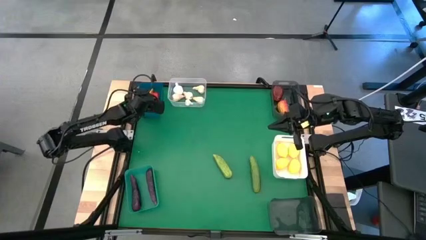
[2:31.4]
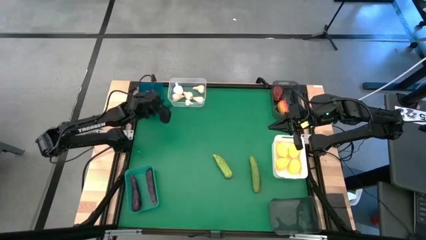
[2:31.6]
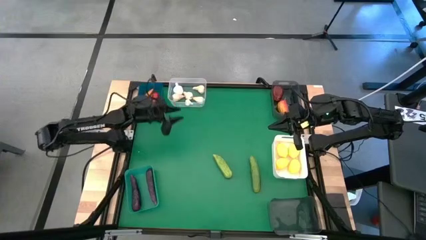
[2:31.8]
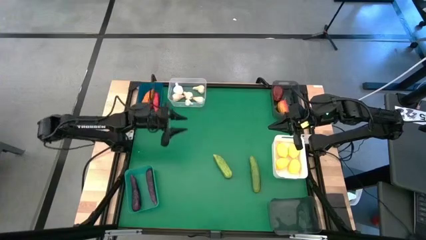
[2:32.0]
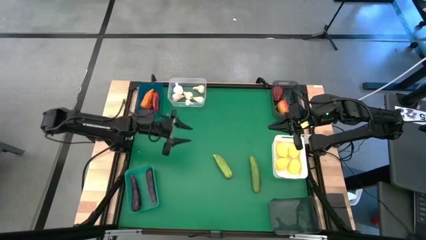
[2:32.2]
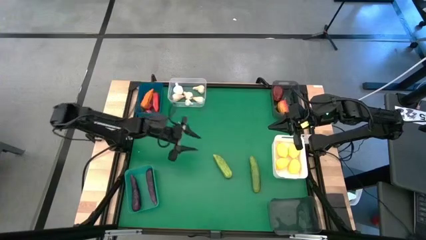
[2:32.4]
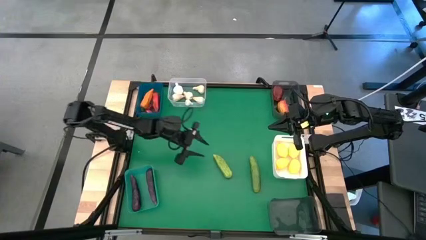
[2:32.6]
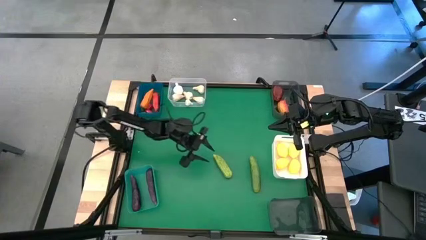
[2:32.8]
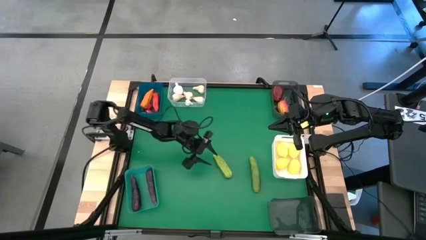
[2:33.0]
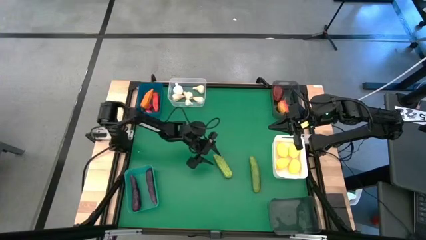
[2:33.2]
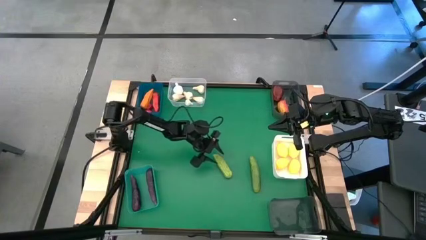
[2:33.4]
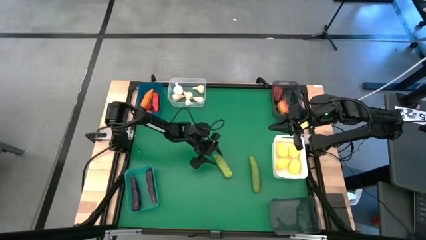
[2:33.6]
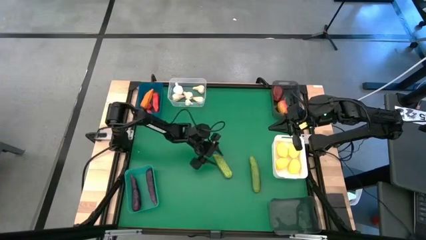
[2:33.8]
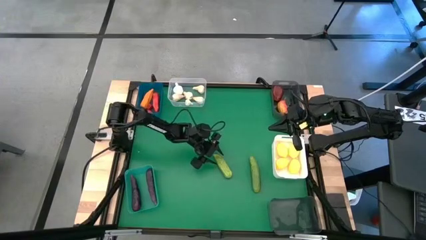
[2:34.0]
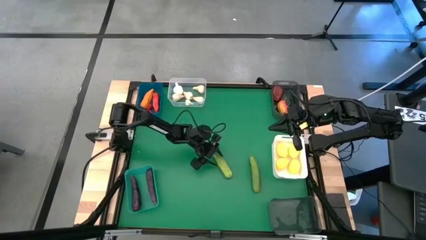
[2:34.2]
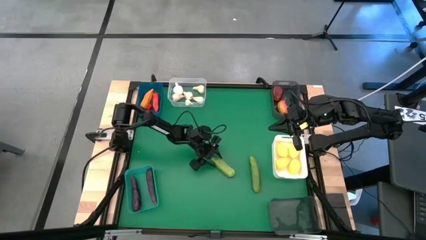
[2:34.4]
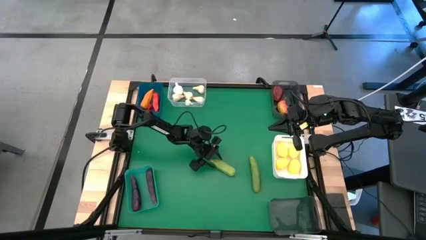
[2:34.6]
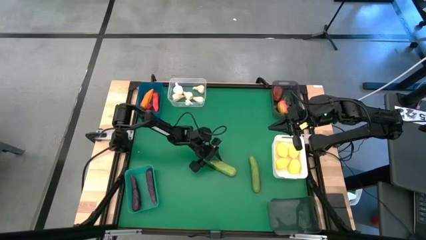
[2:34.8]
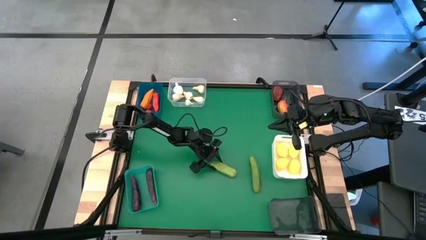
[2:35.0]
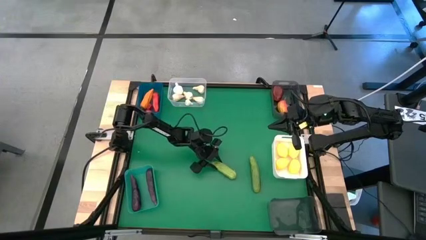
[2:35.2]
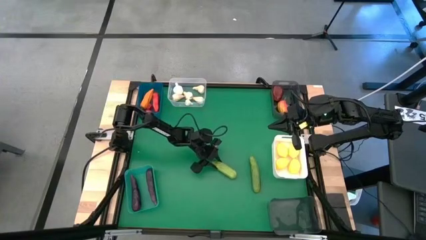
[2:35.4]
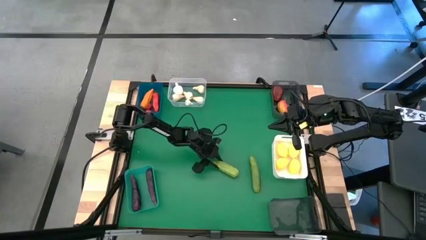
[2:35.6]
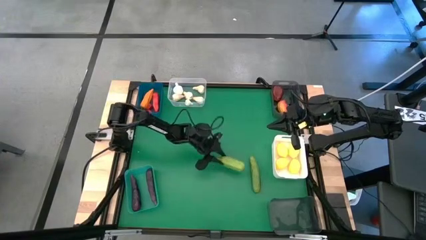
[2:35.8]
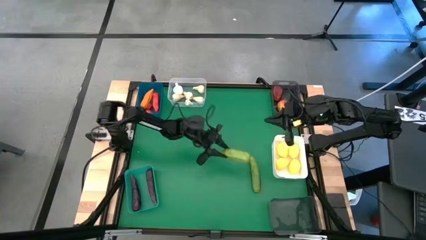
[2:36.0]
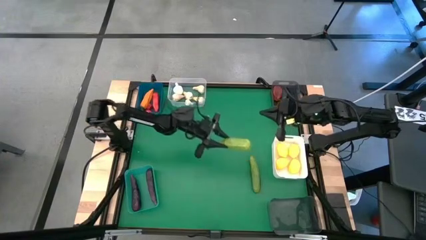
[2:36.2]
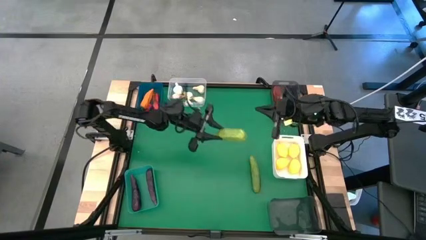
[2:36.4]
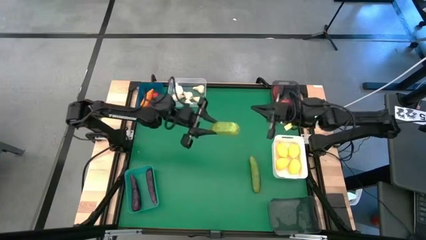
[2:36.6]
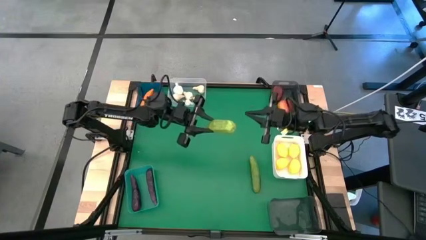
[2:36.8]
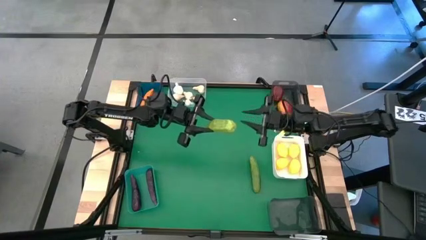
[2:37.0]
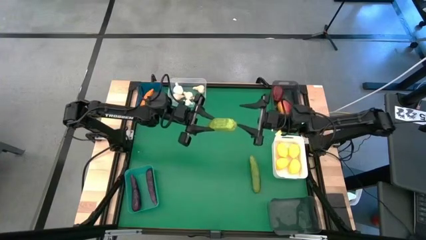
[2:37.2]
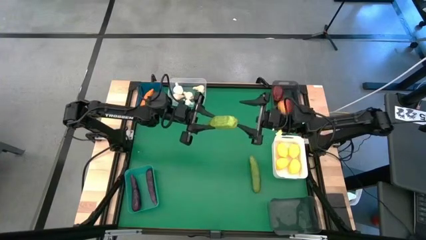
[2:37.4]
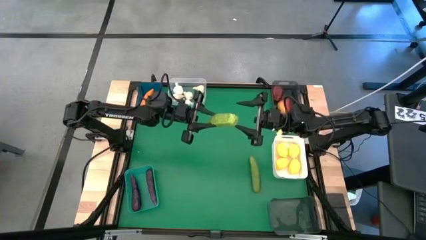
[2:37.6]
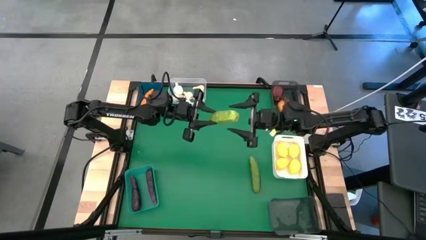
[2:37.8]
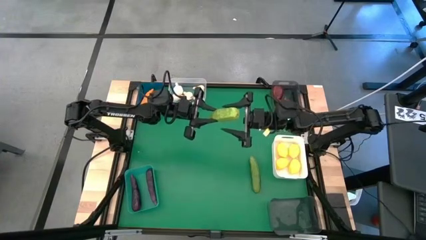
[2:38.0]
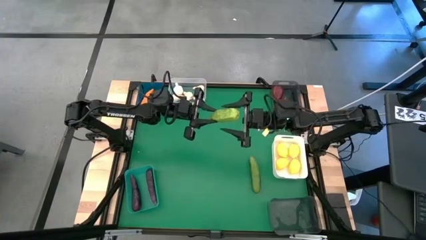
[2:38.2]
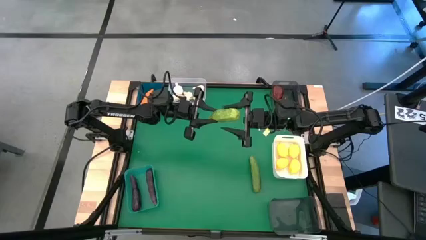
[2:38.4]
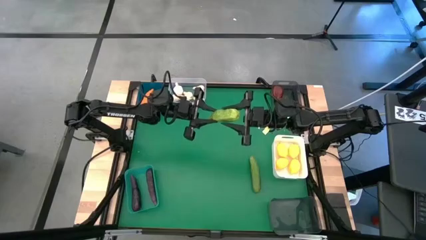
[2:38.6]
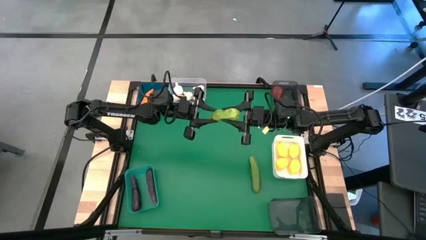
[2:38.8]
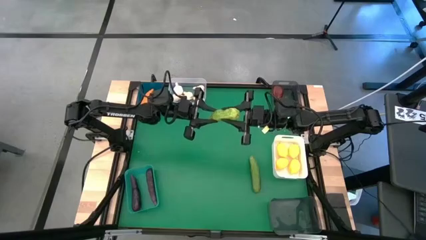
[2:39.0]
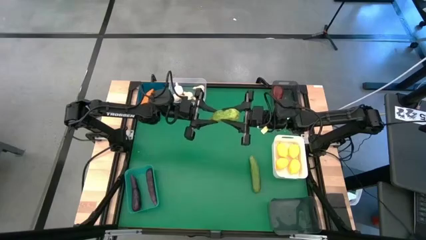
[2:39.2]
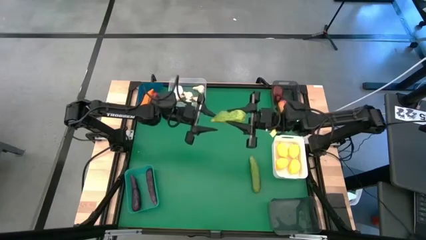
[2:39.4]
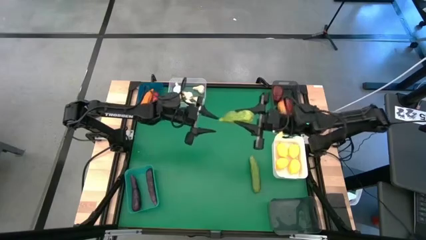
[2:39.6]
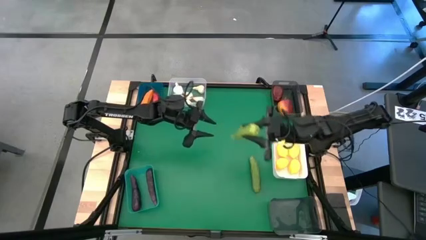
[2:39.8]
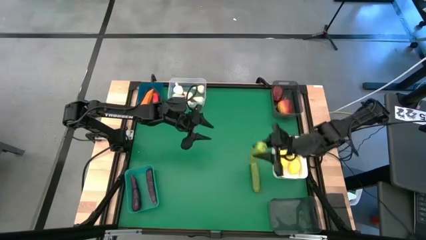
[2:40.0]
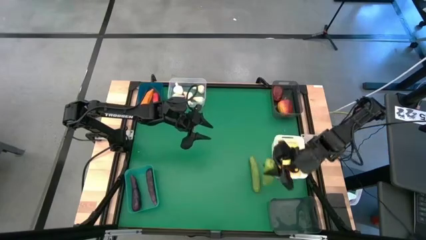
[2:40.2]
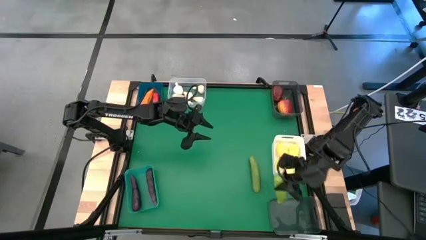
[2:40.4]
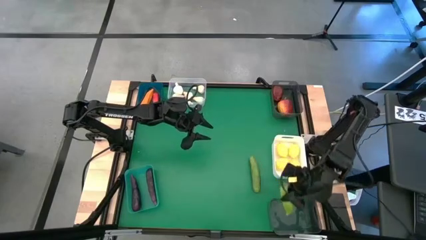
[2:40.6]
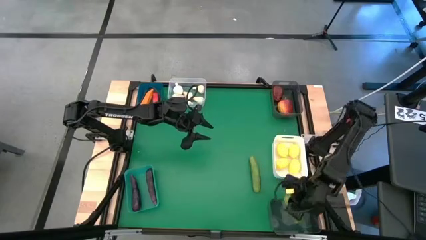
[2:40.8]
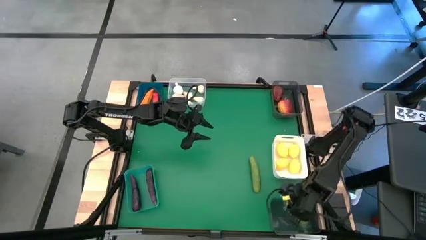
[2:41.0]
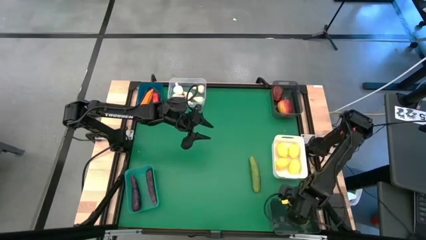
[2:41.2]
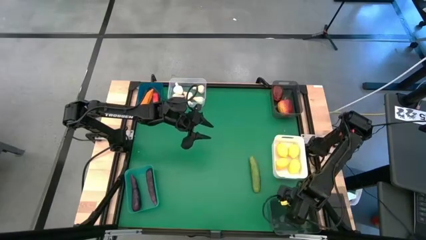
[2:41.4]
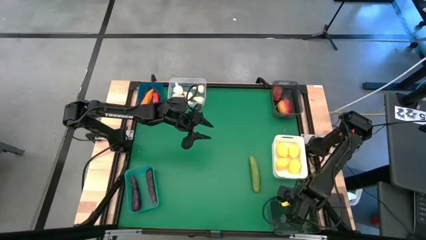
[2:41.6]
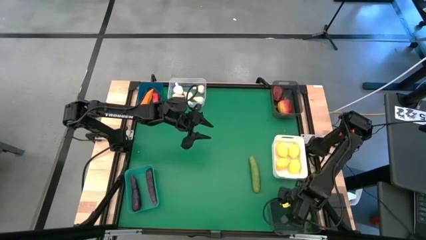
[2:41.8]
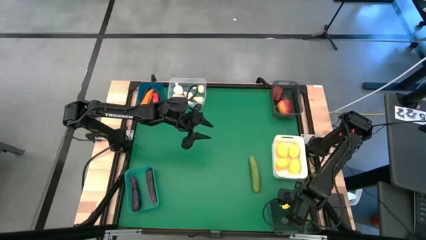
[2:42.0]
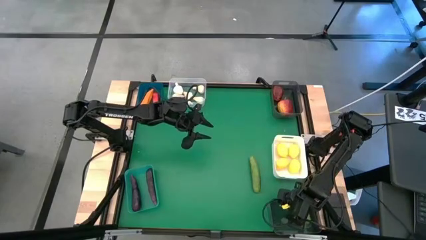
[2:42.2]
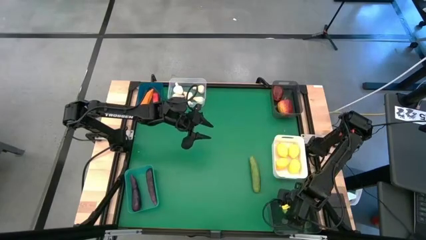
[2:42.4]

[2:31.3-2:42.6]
Task: Sort produce into baskets
Put the green cucumber into the bottom black bin

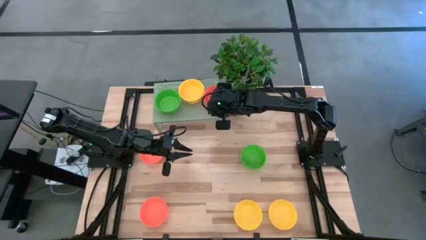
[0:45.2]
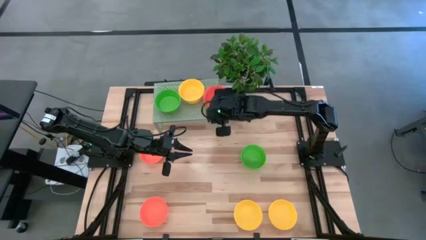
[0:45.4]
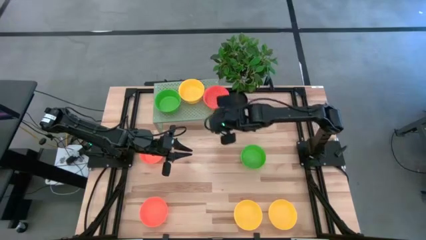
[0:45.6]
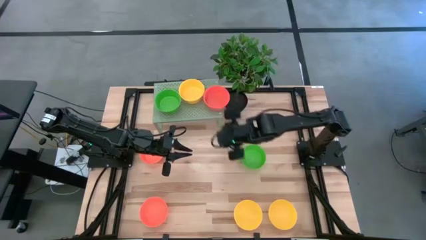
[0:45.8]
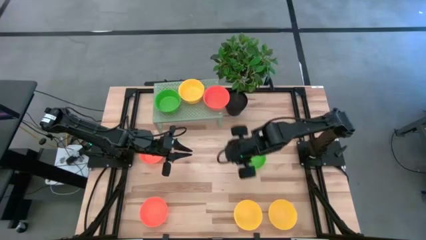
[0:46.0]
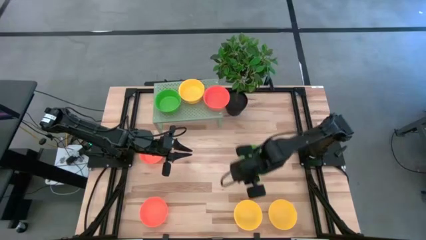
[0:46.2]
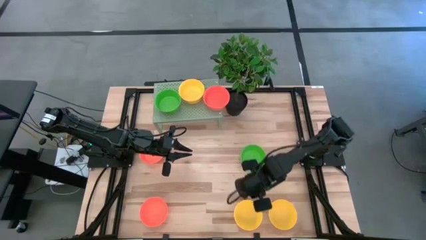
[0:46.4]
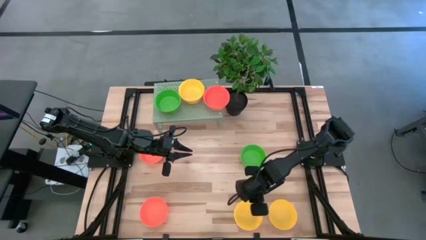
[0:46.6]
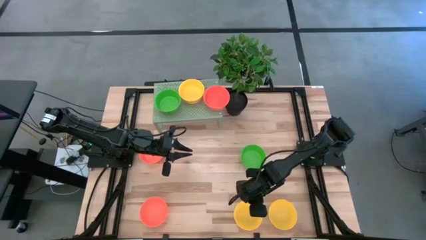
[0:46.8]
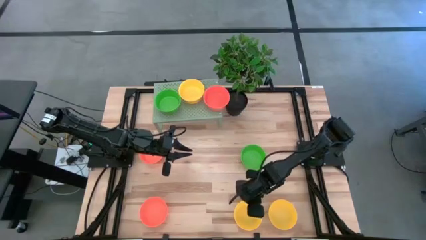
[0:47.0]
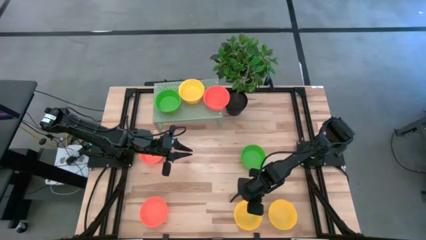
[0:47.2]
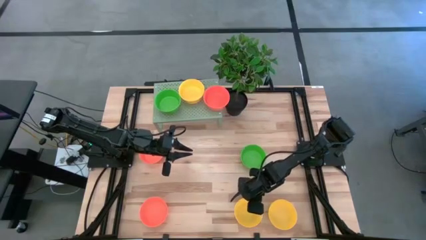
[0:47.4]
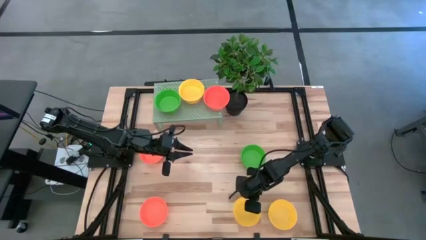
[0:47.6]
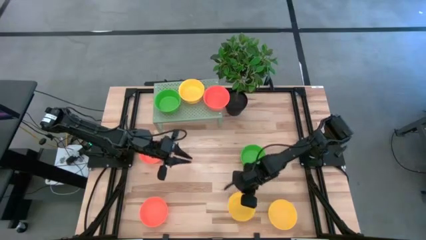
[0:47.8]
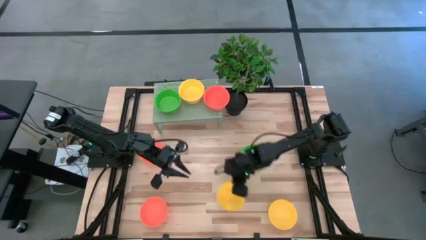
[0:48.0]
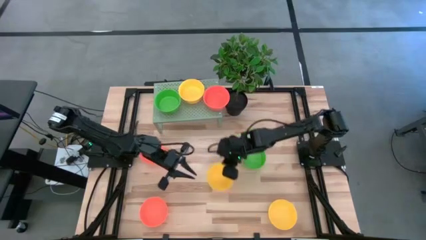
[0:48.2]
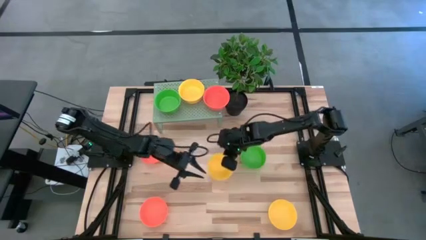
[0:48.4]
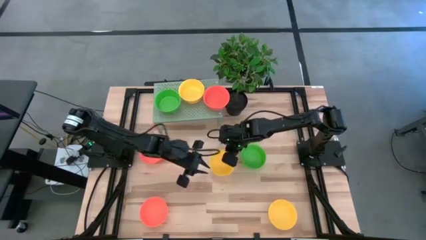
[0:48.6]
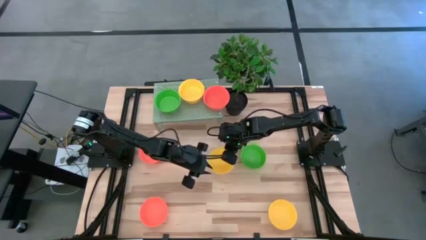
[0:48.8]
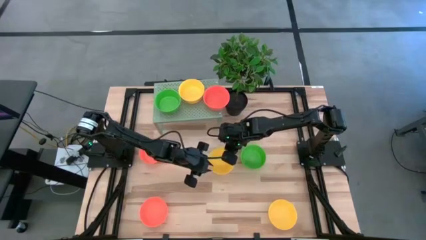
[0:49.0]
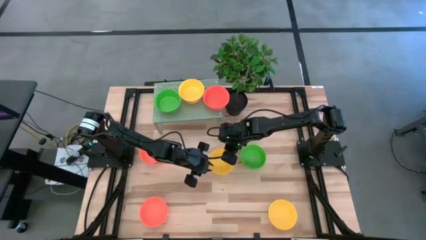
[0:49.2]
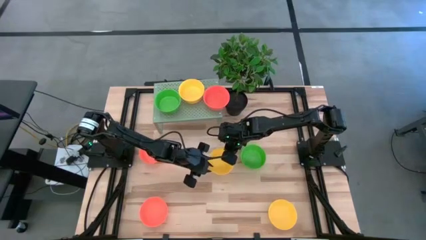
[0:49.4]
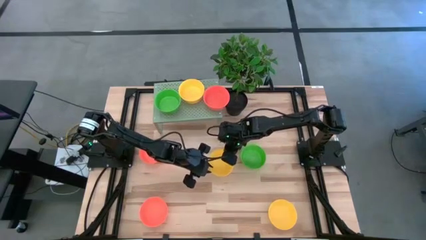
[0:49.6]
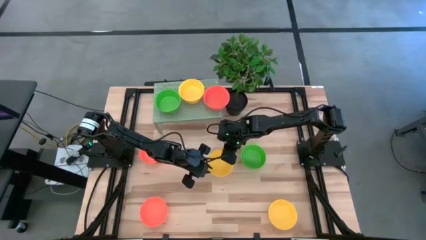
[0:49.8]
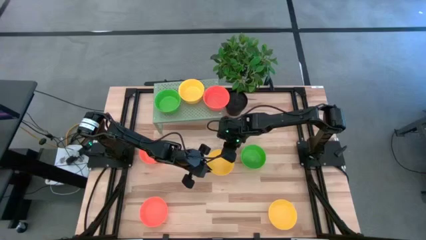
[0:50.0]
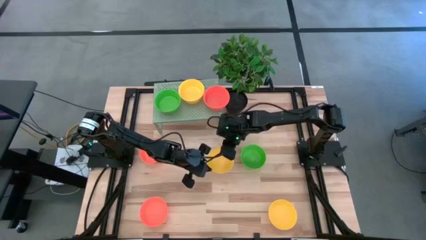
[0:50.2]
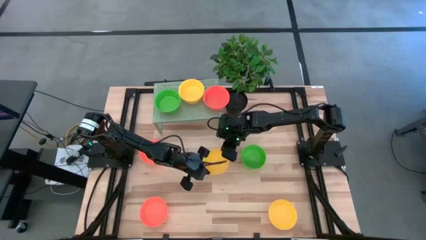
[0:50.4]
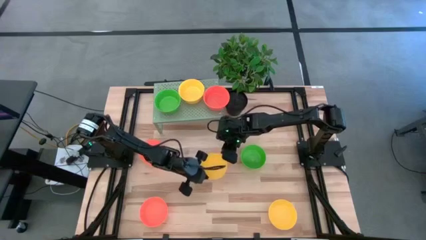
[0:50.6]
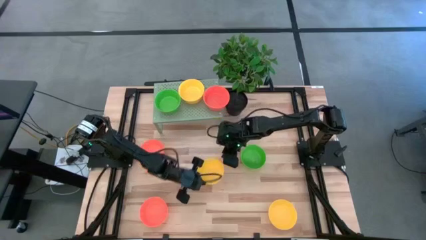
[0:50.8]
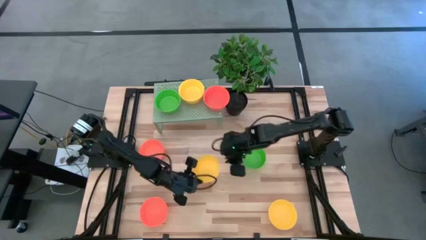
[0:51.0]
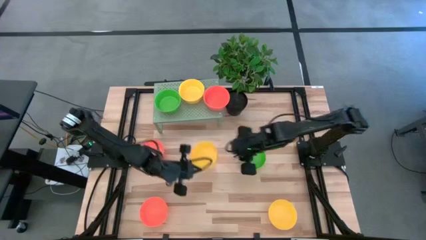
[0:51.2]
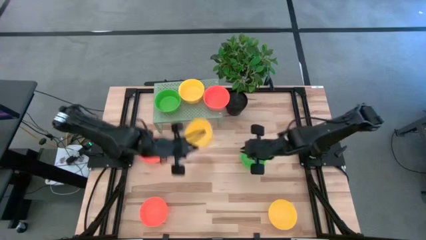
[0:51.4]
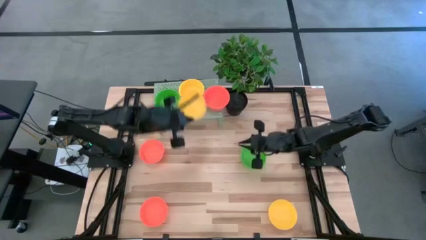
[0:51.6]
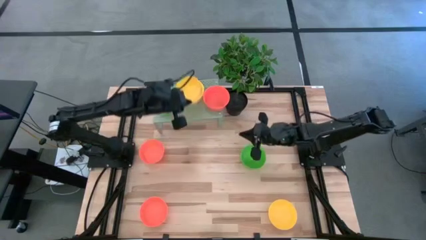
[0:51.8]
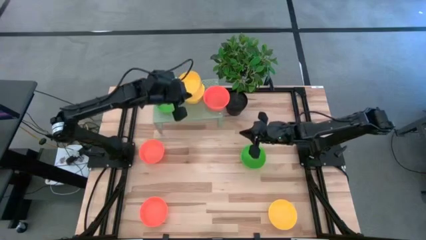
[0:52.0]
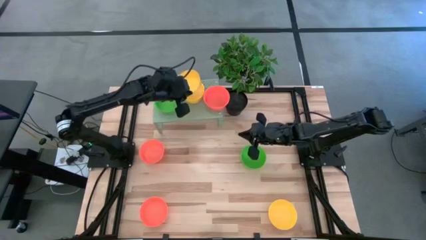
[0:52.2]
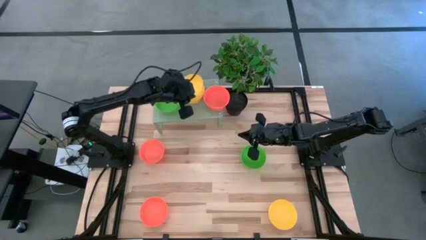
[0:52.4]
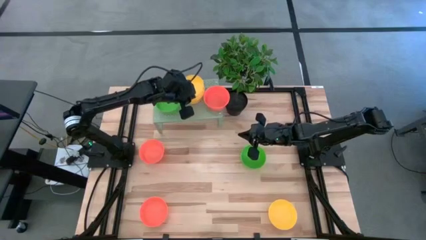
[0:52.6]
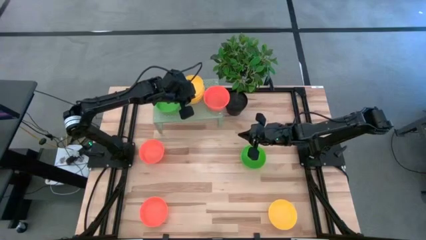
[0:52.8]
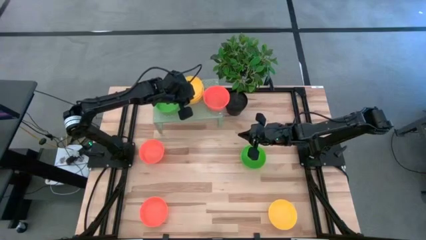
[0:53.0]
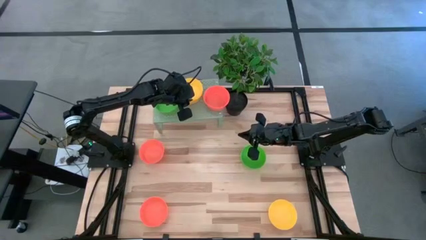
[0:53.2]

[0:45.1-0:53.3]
Task: Pick & Place Mini bowls
Stack the yellow bowl on top of the yellow bowl on the shelf
